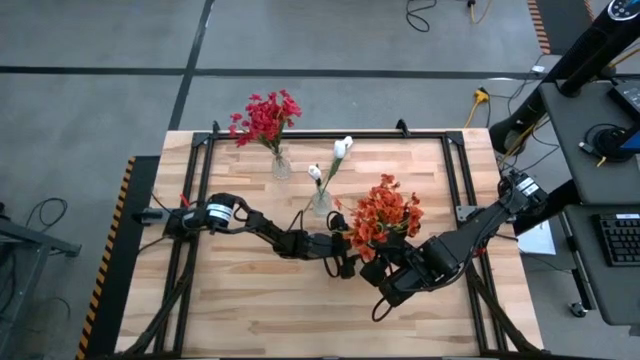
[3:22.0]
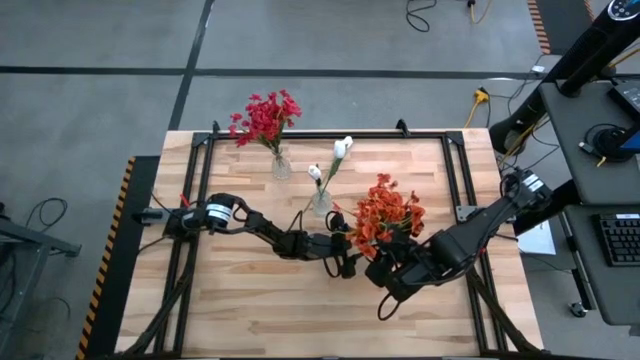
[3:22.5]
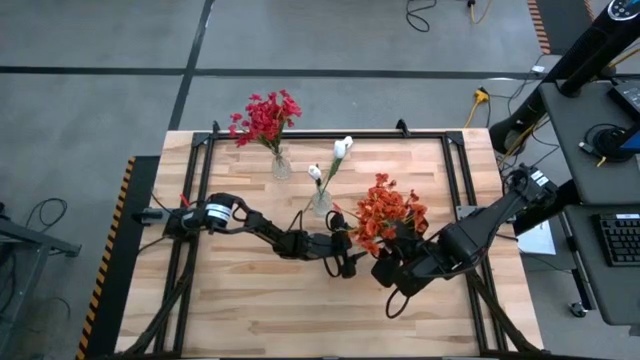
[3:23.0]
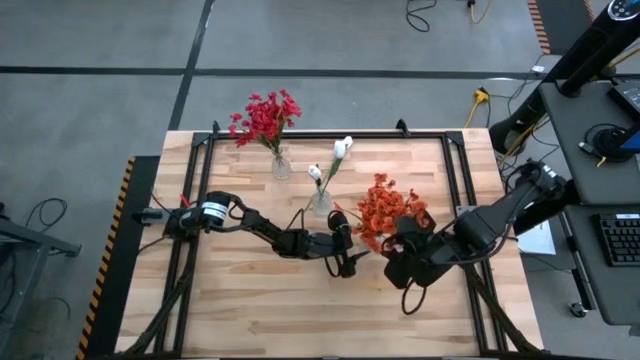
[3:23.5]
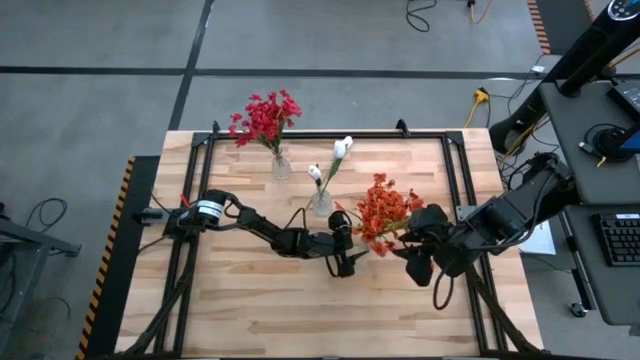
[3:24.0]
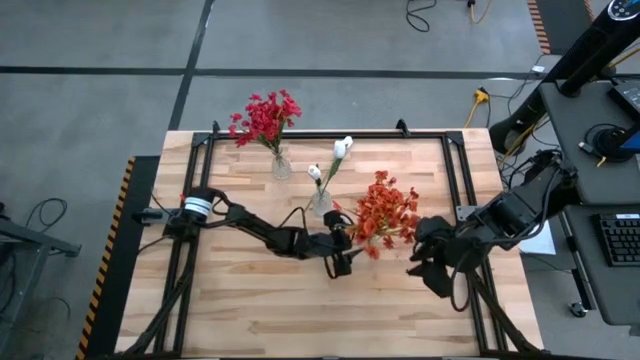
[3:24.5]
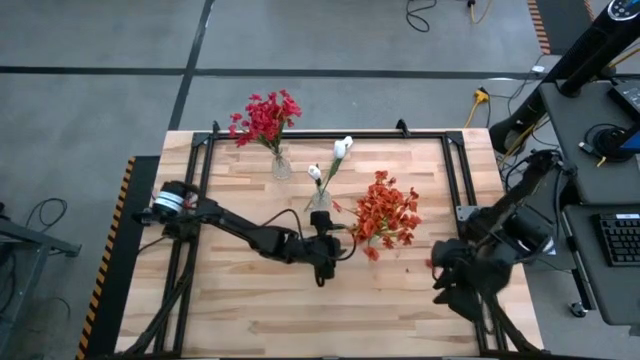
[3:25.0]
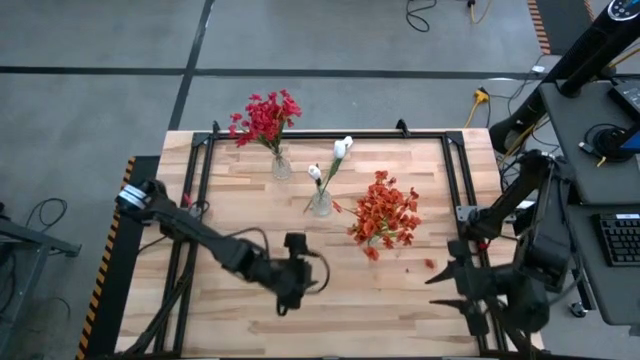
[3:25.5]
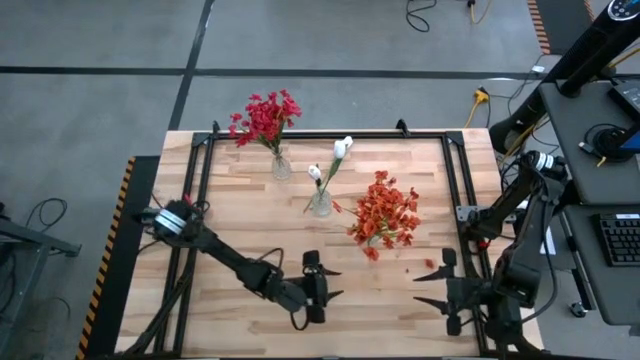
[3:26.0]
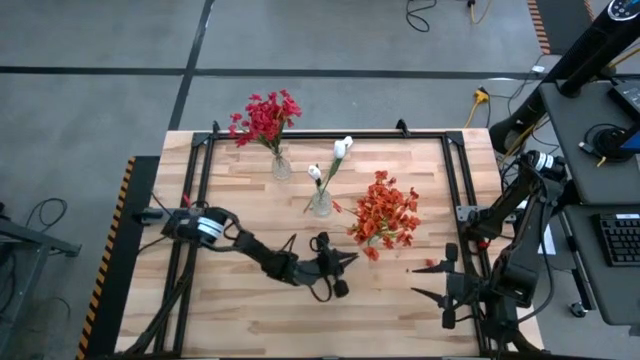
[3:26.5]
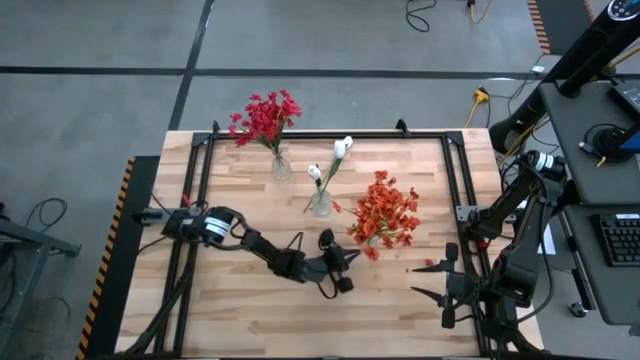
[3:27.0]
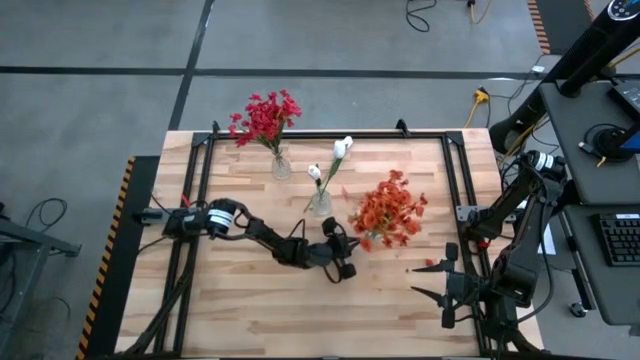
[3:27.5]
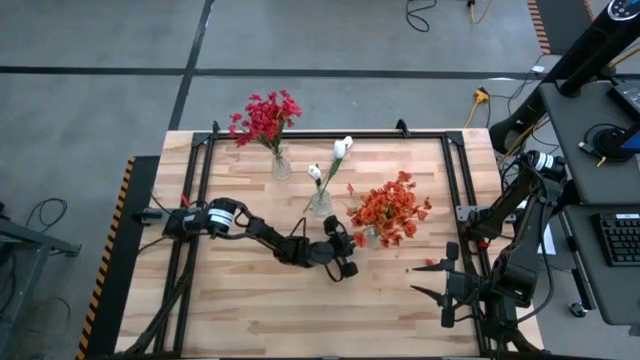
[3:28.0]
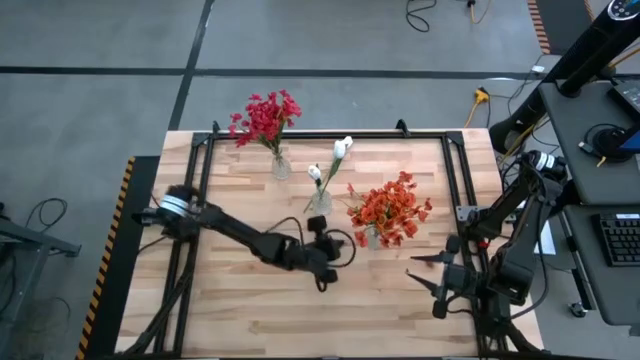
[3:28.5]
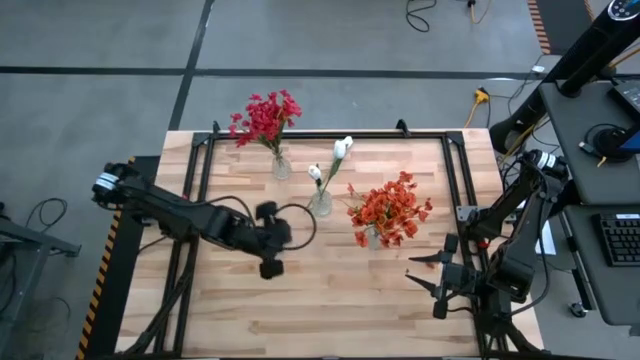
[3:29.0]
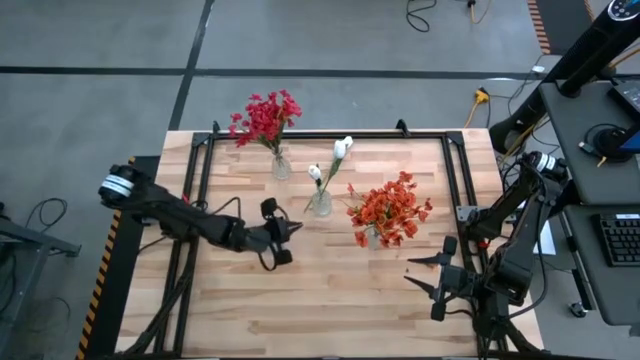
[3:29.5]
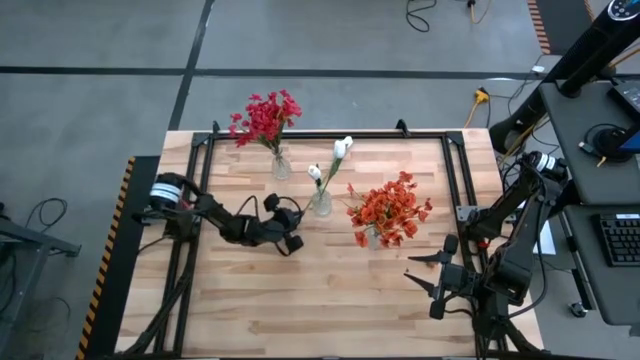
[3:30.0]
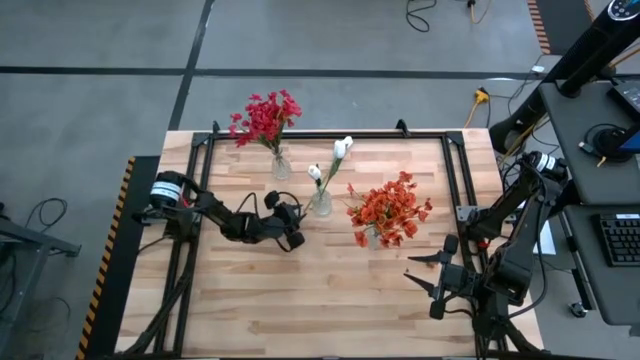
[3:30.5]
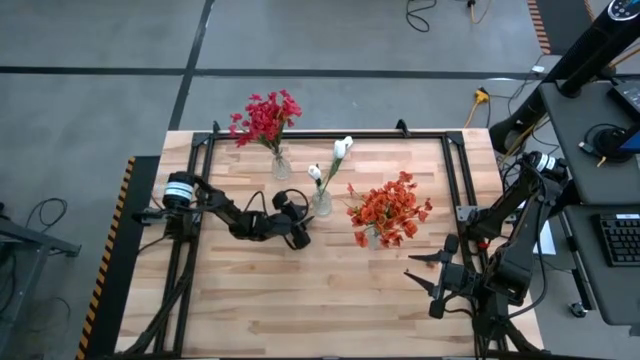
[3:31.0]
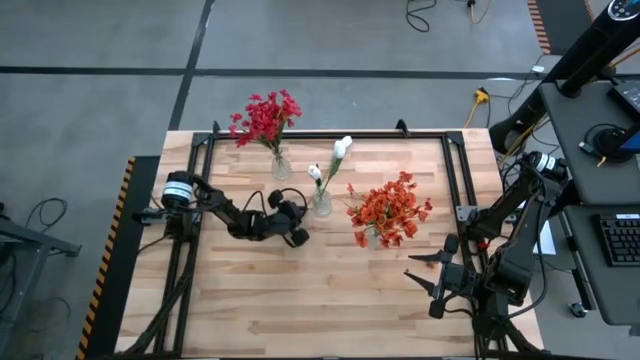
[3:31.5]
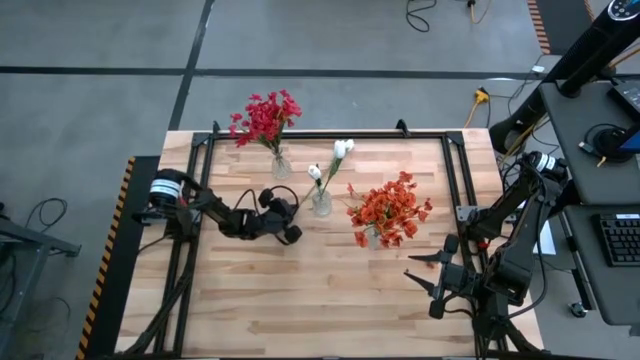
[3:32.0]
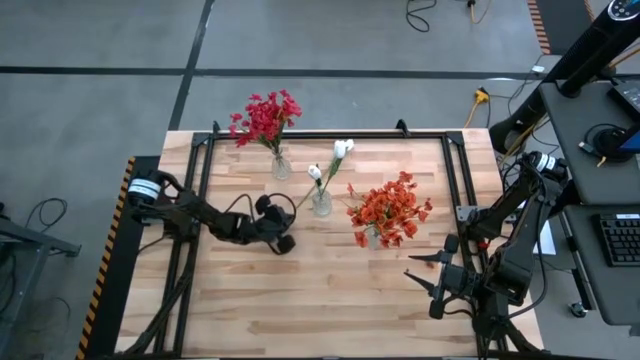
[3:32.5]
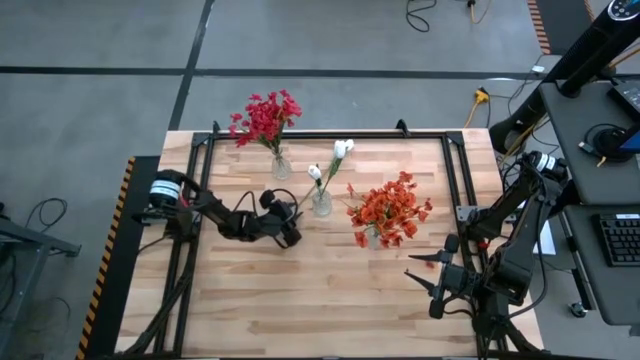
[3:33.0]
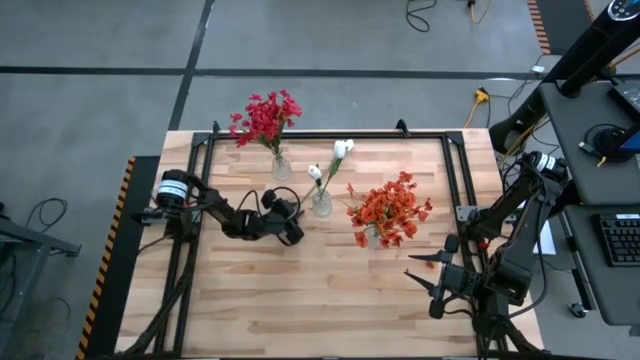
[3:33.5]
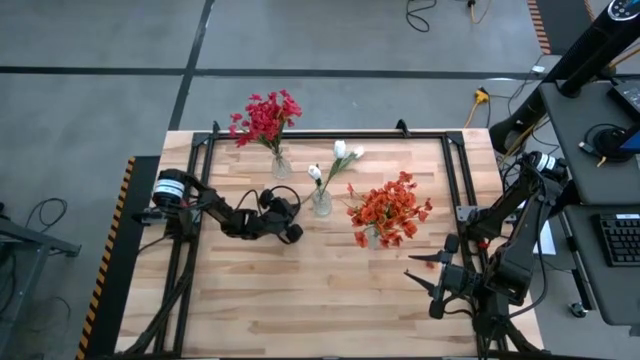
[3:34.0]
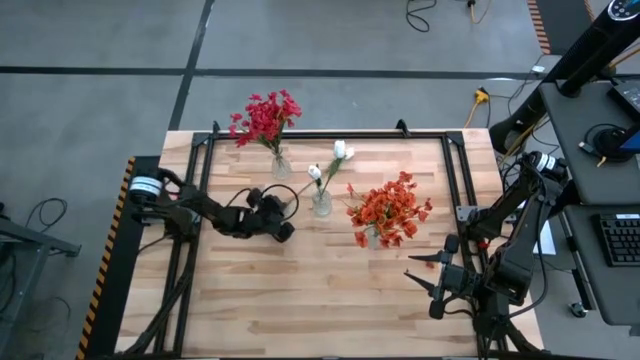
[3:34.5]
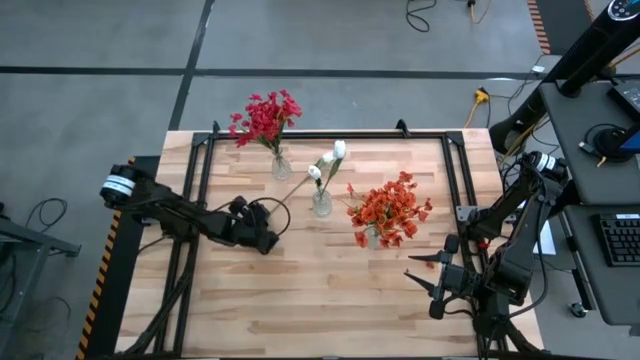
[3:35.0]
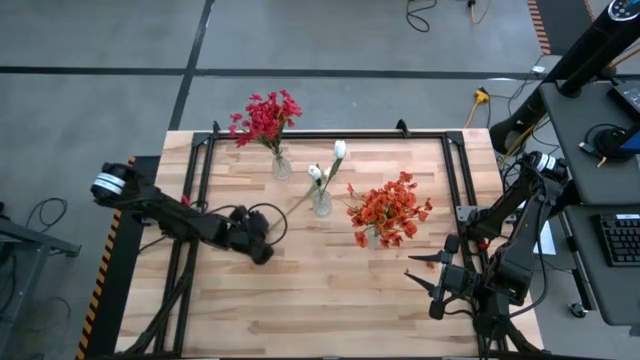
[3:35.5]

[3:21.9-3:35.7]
Task: Sort flowers into vase by color
Put the top center white tulip flower into the center transparent glass vase

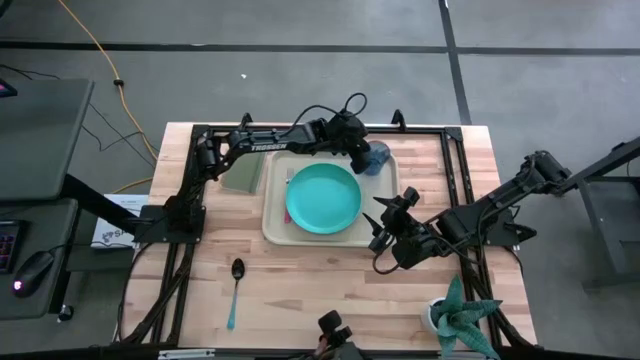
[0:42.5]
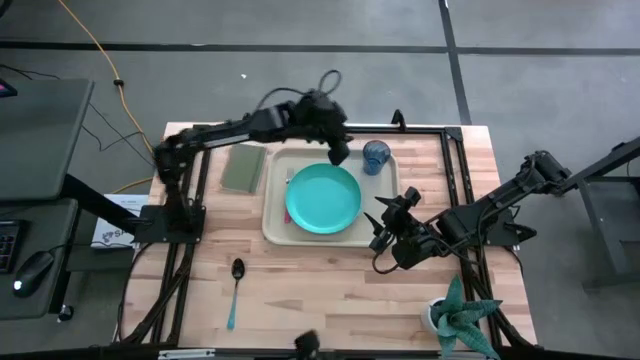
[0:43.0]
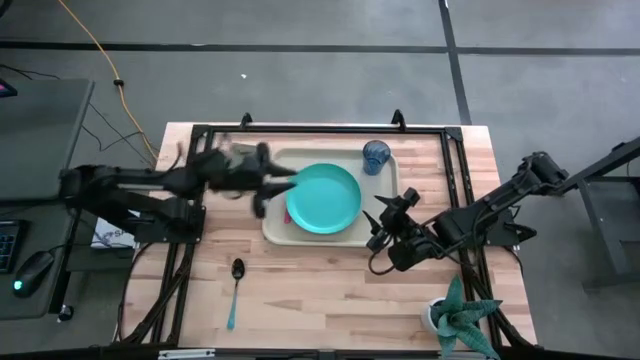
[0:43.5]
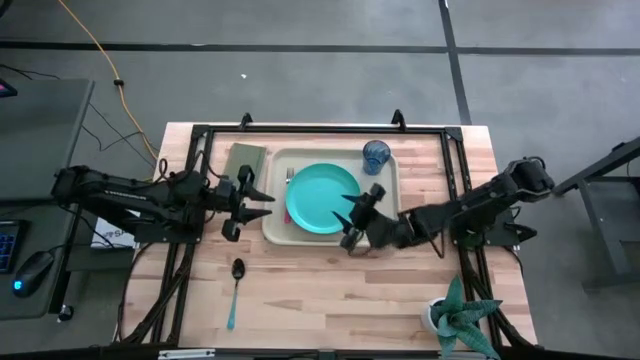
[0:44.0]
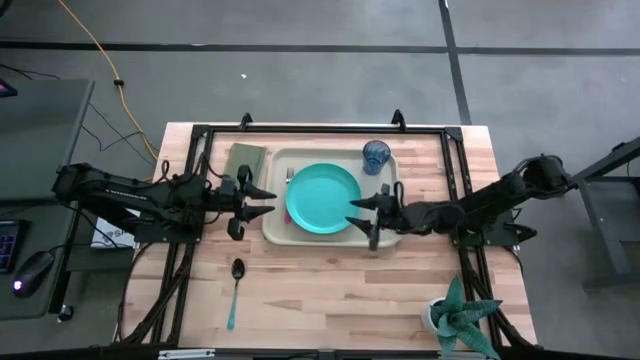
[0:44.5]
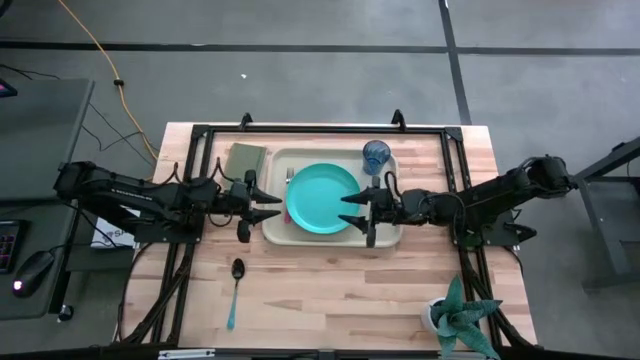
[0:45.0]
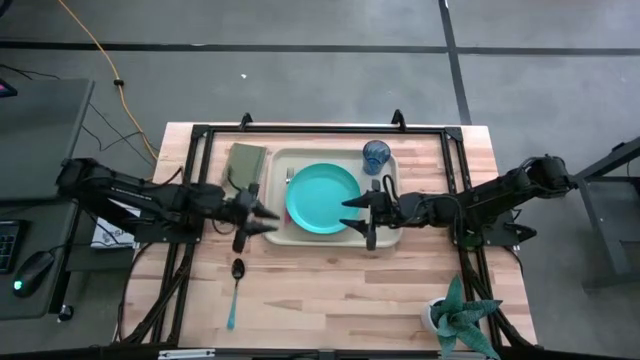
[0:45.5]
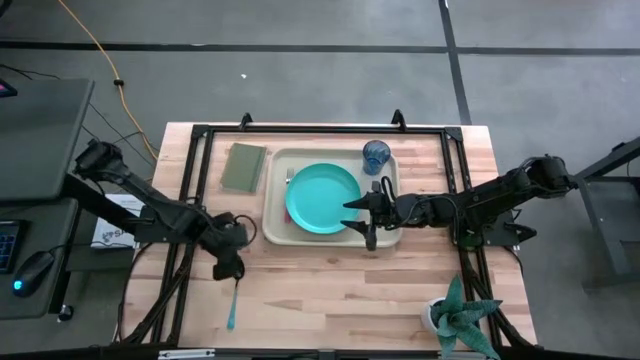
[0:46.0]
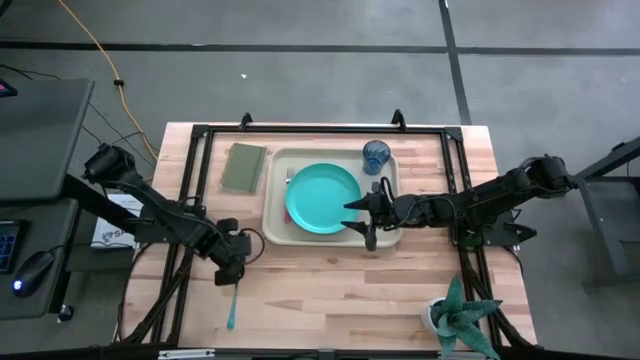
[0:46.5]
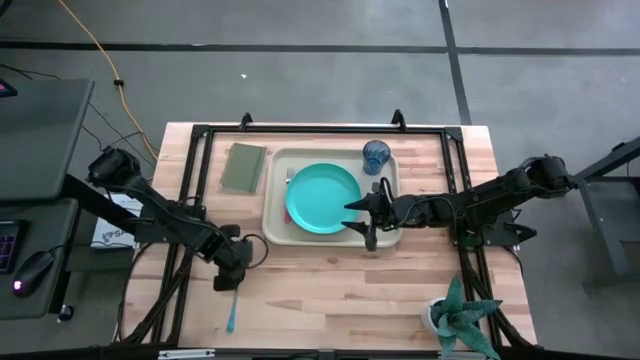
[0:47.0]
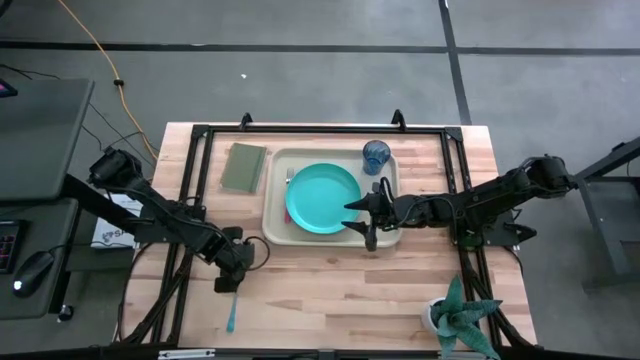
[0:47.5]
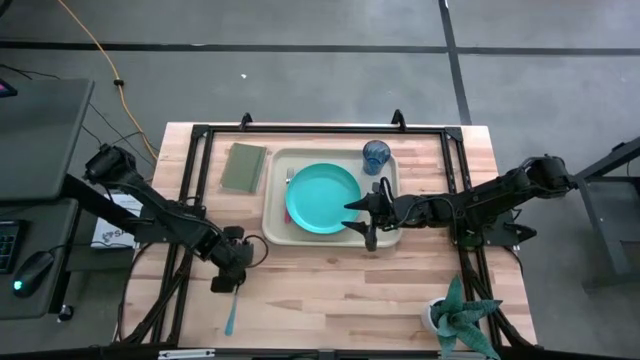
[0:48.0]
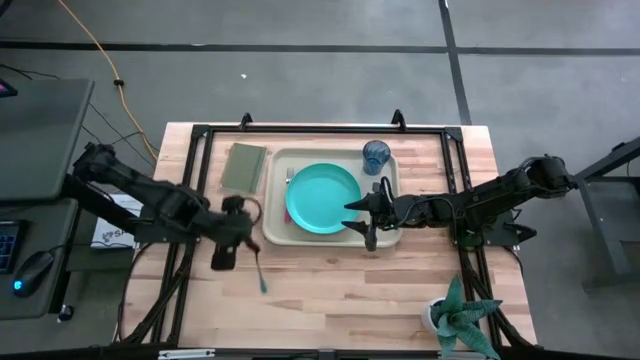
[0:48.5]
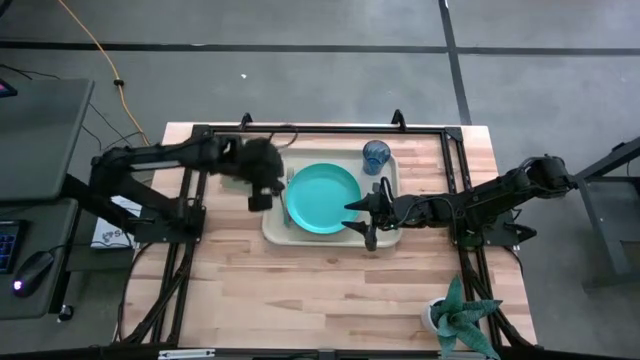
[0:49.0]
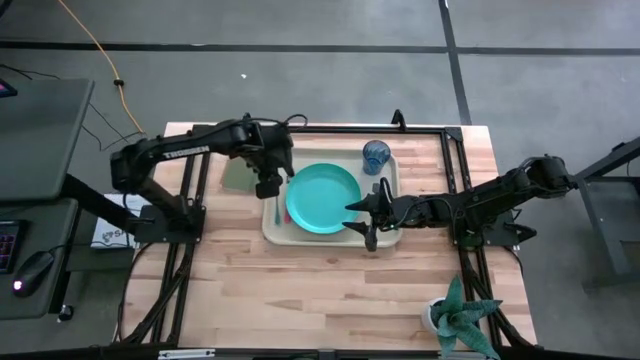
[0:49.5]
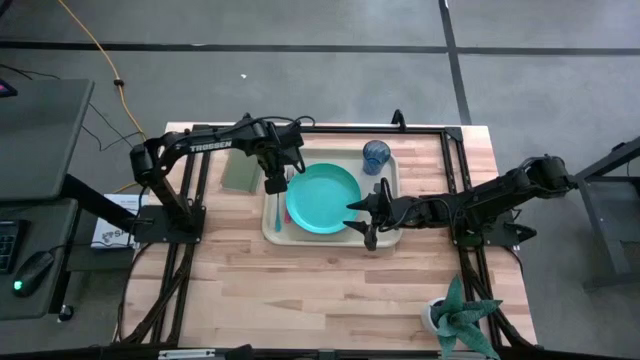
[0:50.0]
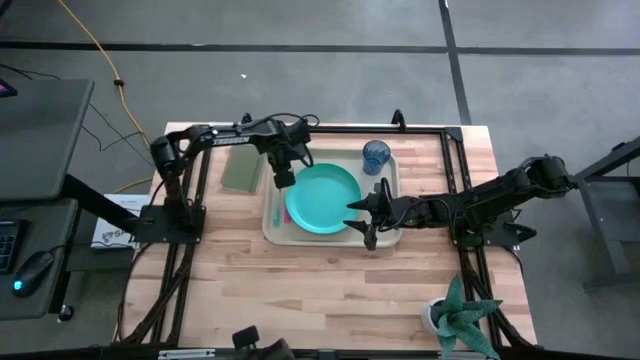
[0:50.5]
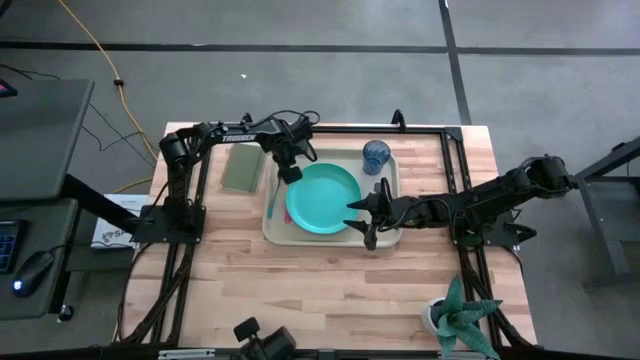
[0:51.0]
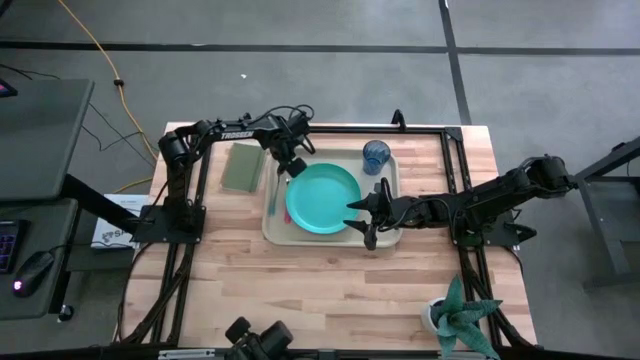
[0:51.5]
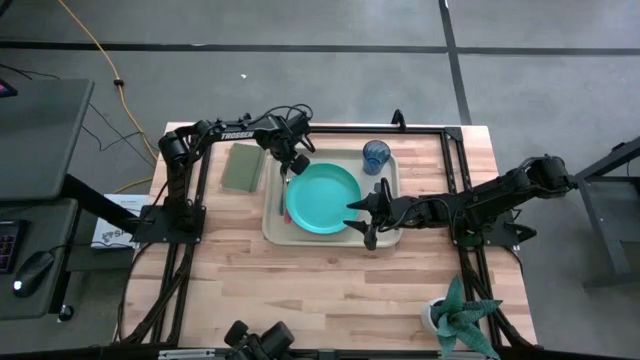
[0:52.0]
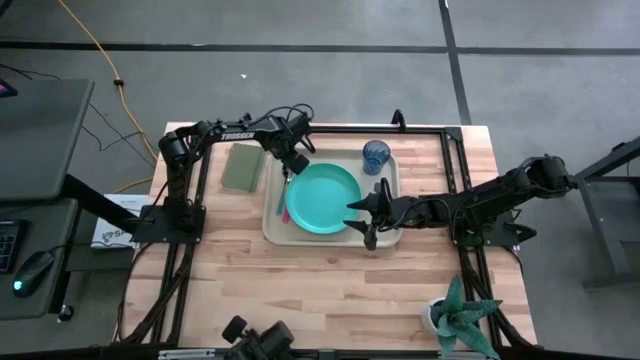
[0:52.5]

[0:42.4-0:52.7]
Task: Pick and place plate/cup/fork/spoon on tray
Put the blue spoon on the left side of the pink fork
